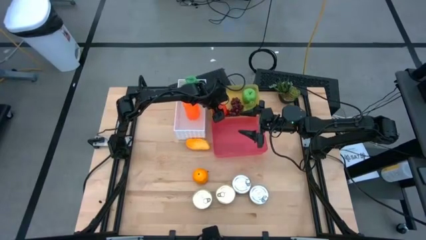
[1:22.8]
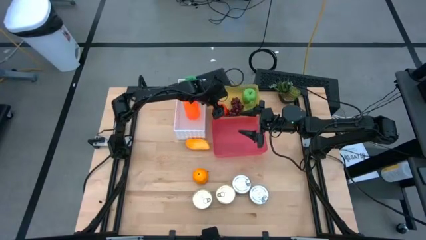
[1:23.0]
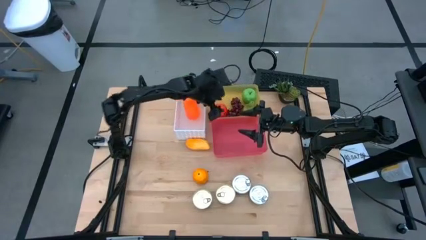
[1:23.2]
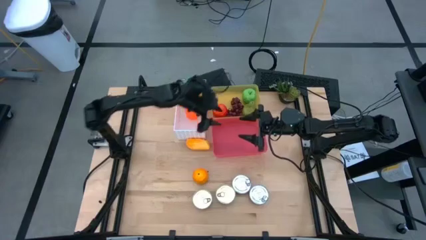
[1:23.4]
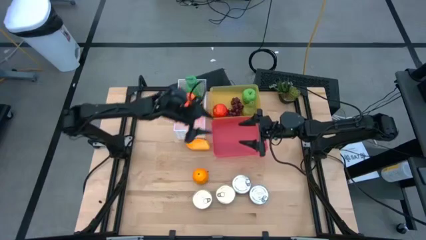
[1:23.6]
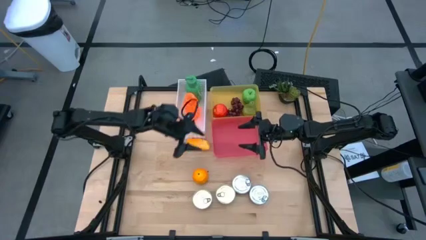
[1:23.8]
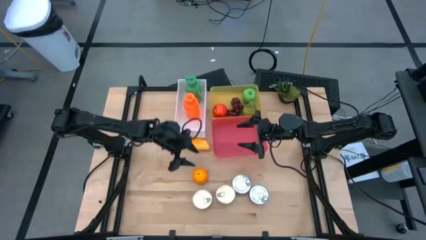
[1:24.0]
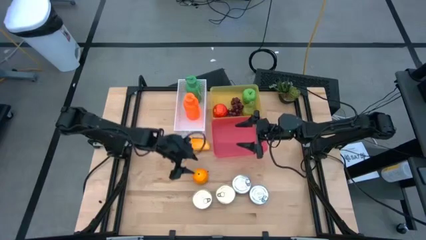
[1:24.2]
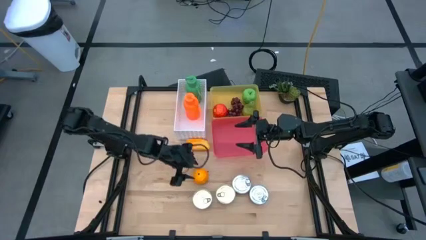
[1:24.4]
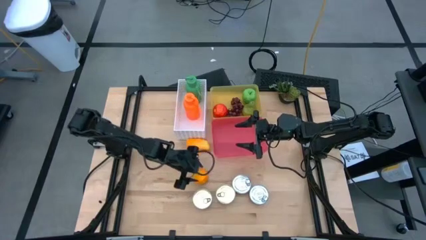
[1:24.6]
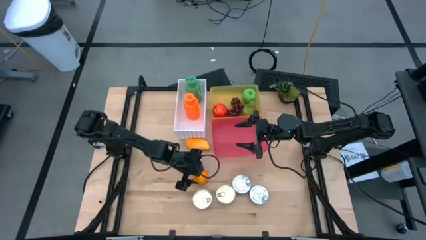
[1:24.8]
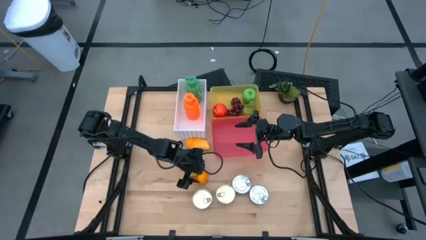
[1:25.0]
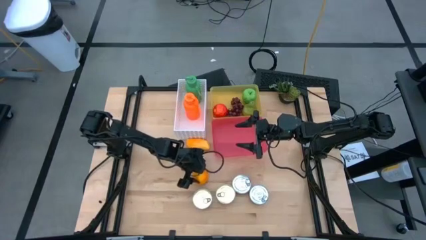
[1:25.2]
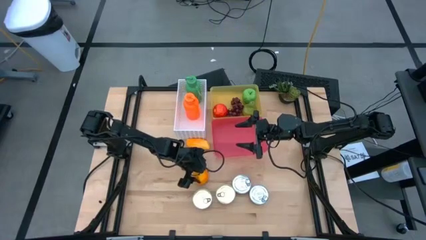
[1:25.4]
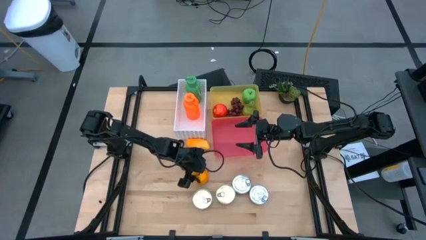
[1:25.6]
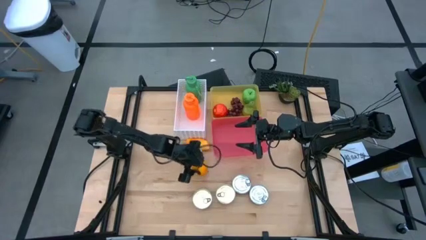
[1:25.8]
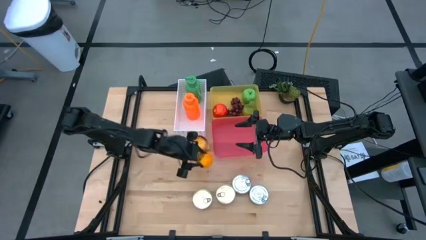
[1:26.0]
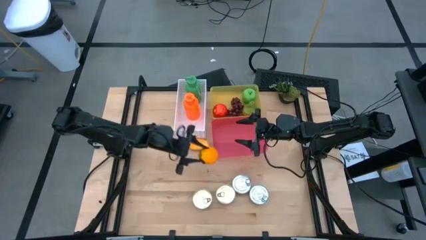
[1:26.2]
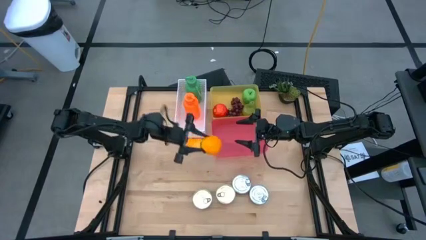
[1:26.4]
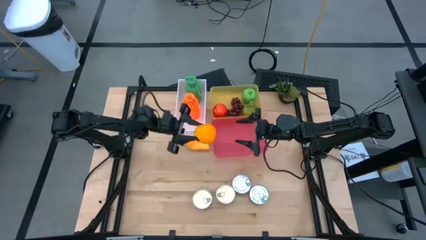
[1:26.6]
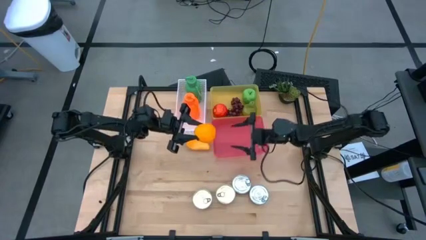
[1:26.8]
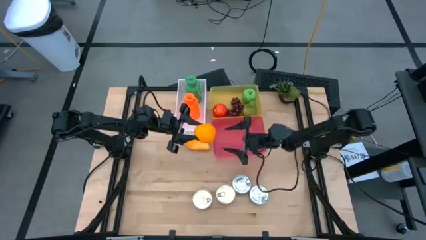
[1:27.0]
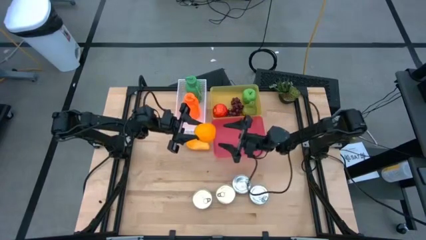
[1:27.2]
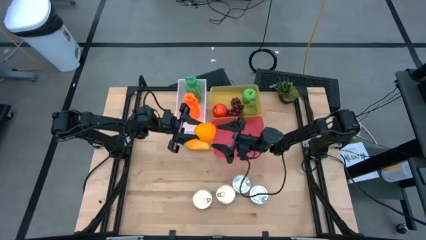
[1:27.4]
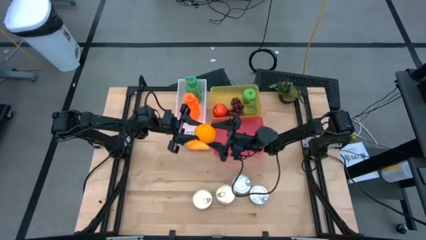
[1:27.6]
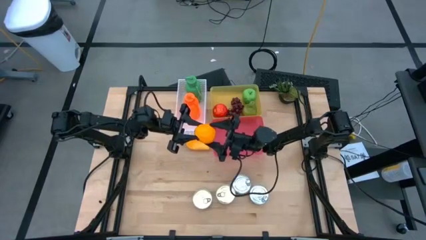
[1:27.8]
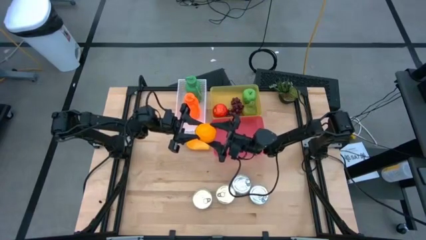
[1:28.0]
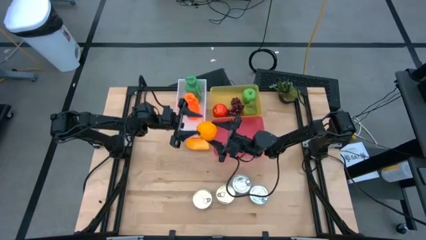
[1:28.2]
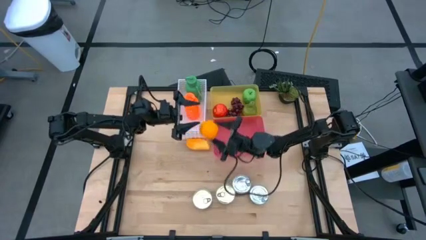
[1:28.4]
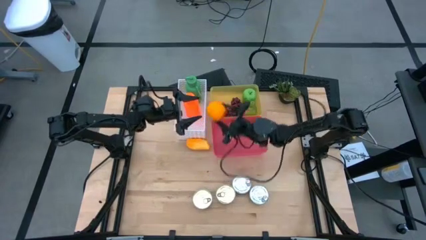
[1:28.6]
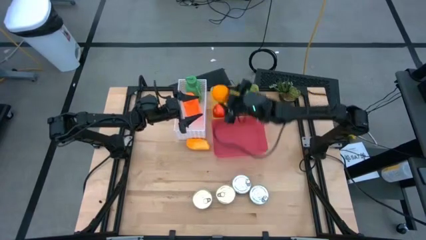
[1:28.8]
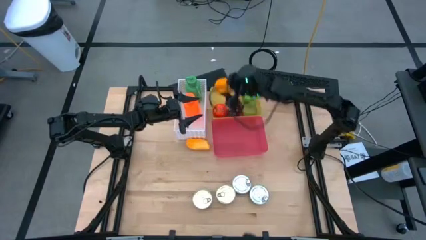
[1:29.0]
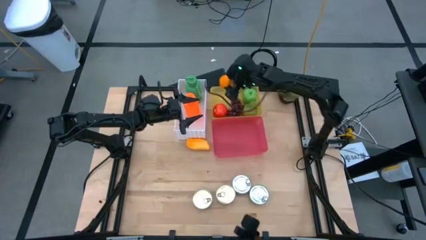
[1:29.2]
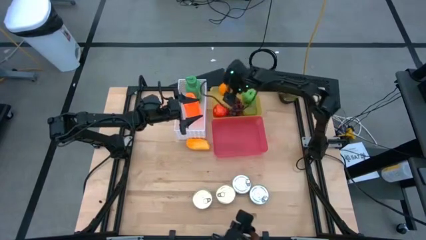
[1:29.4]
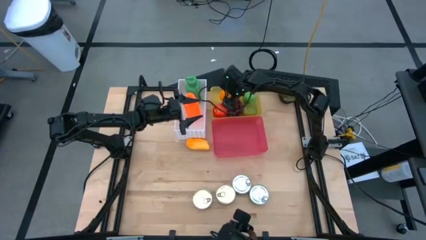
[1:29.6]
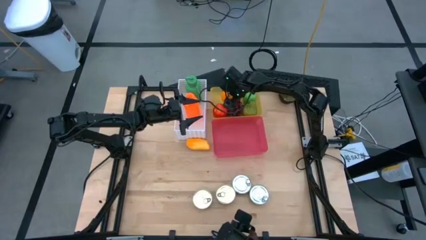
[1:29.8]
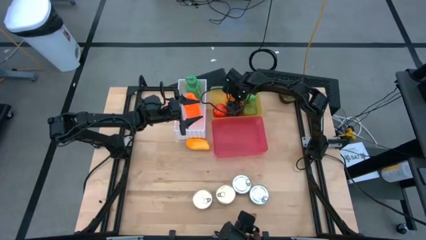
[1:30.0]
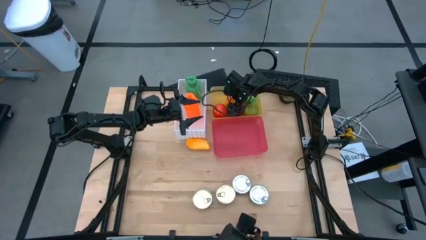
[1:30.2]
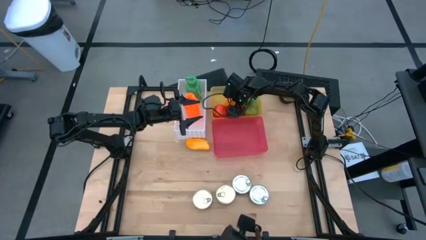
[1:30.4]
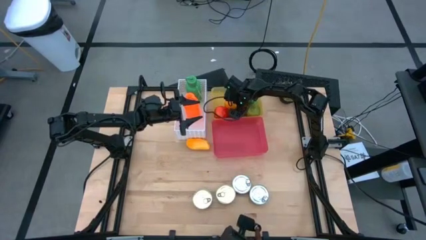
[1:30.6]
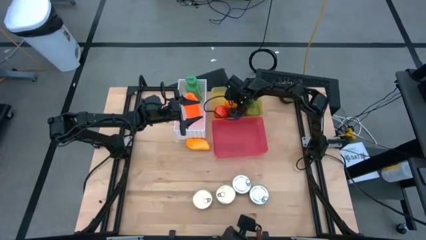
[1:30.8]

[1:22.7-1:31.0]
Task: Pick & Place Food Item
Put the orange into the yellow bin

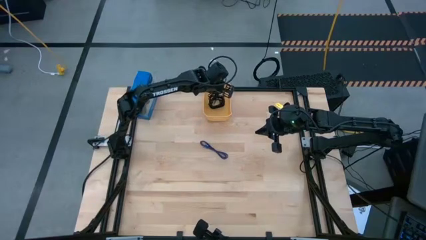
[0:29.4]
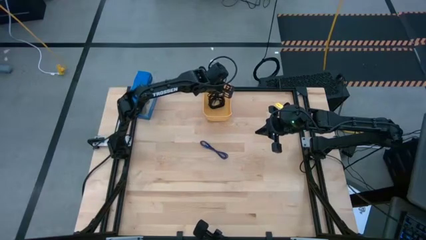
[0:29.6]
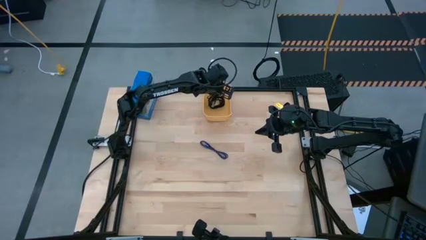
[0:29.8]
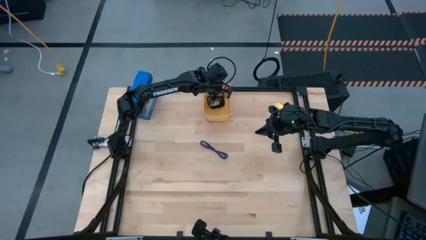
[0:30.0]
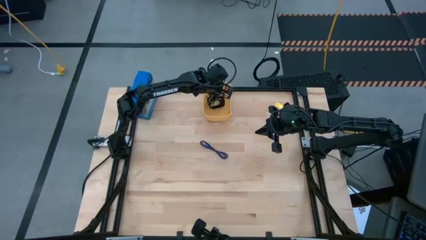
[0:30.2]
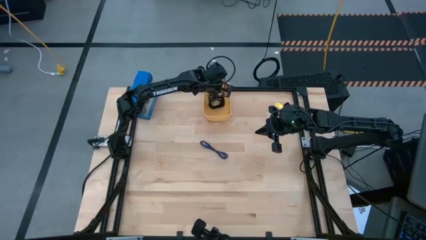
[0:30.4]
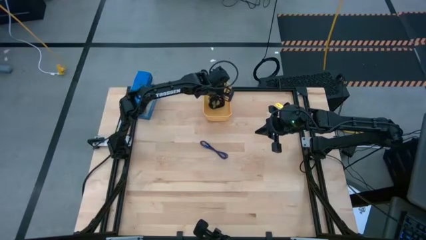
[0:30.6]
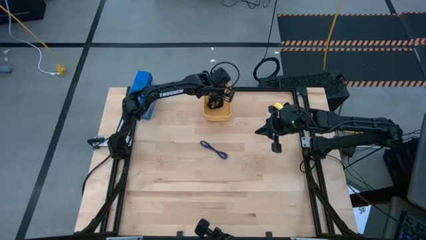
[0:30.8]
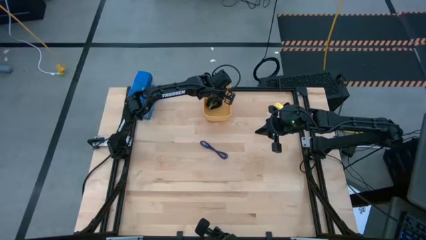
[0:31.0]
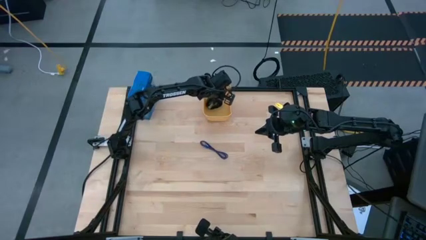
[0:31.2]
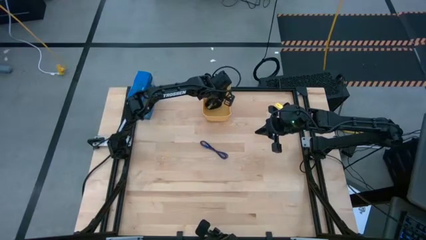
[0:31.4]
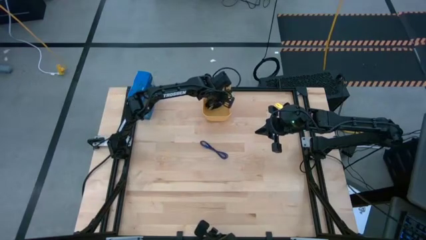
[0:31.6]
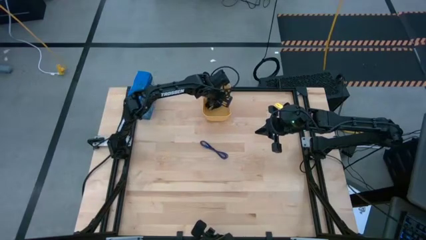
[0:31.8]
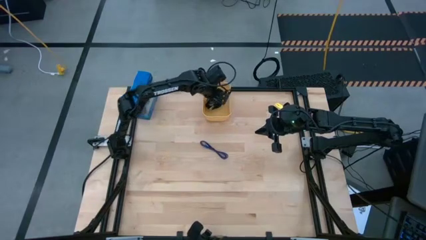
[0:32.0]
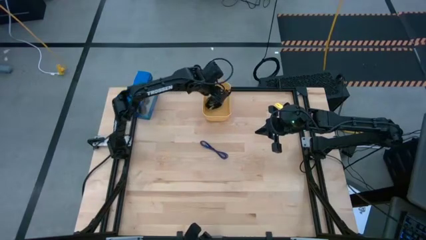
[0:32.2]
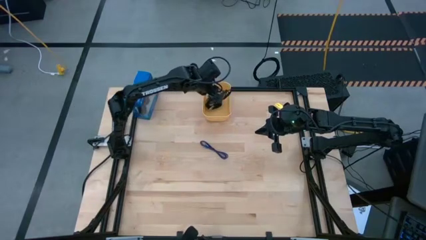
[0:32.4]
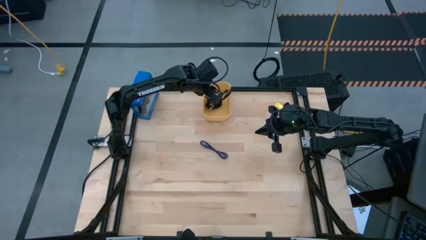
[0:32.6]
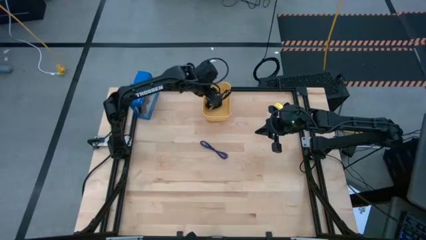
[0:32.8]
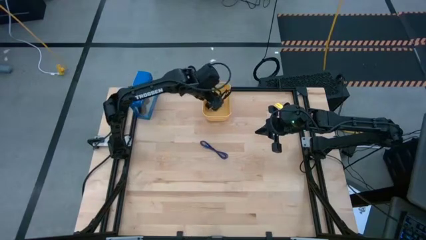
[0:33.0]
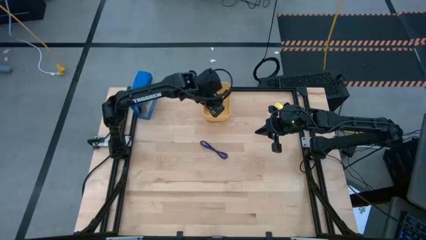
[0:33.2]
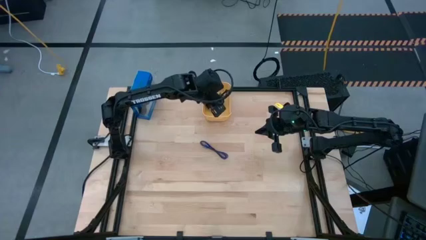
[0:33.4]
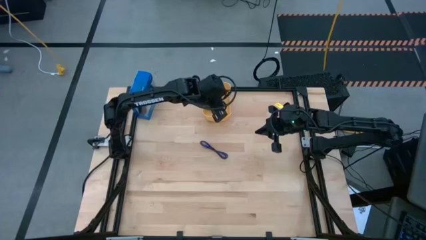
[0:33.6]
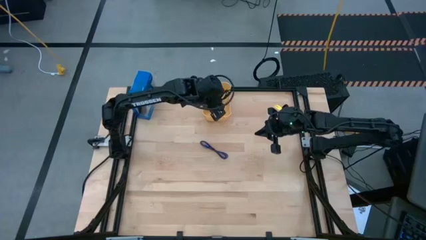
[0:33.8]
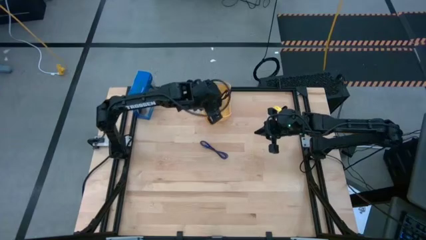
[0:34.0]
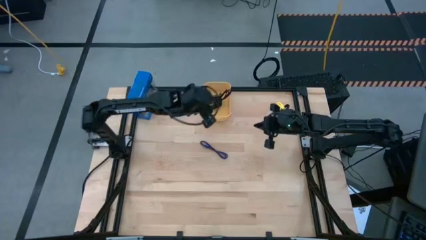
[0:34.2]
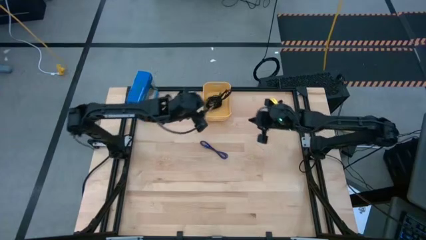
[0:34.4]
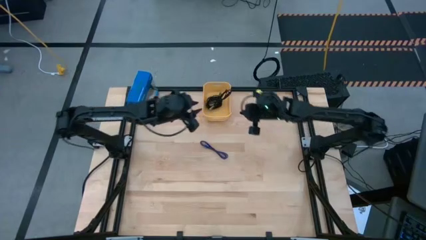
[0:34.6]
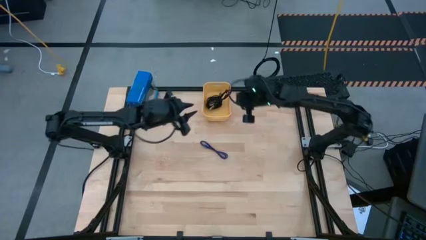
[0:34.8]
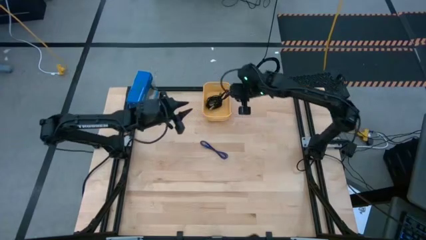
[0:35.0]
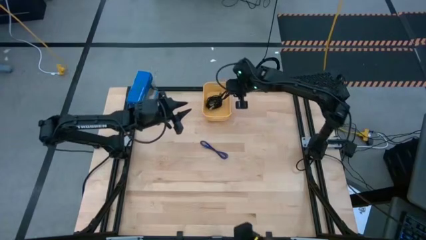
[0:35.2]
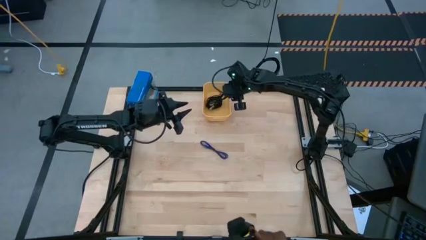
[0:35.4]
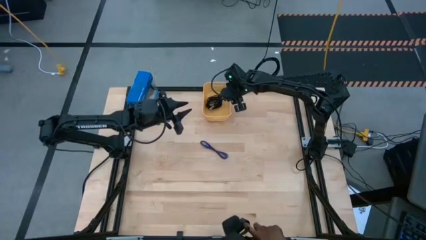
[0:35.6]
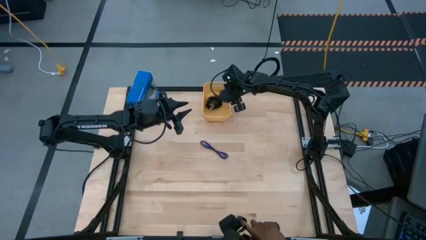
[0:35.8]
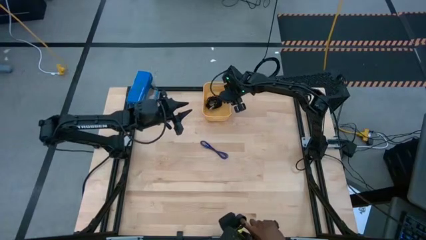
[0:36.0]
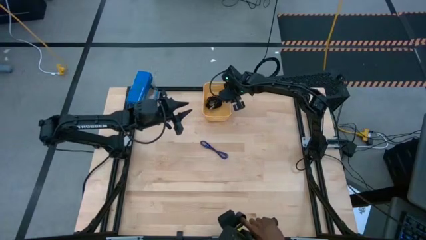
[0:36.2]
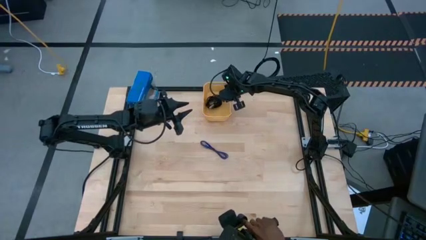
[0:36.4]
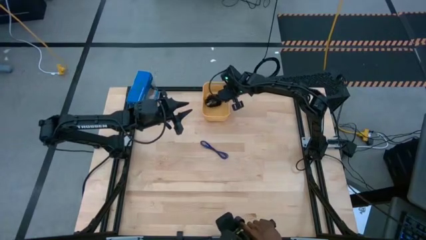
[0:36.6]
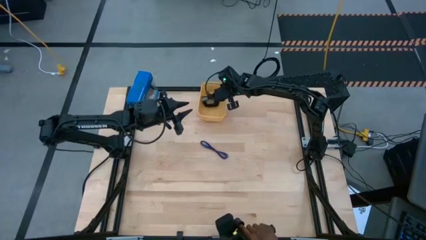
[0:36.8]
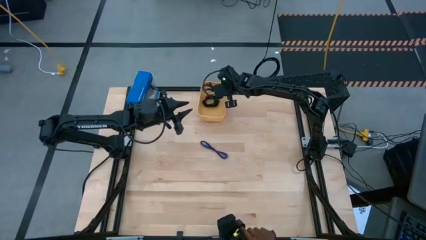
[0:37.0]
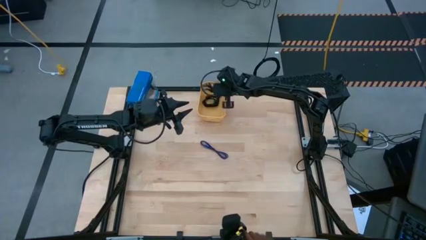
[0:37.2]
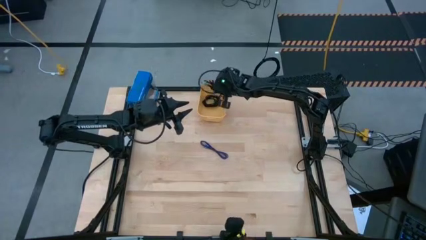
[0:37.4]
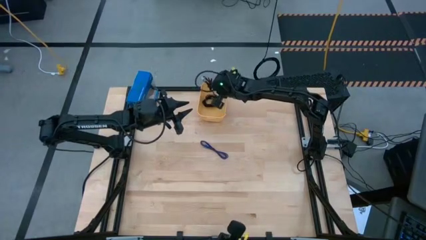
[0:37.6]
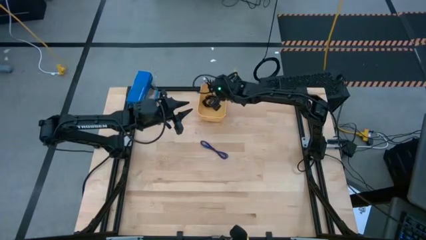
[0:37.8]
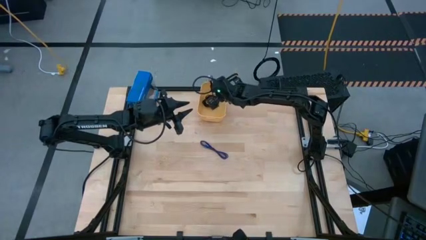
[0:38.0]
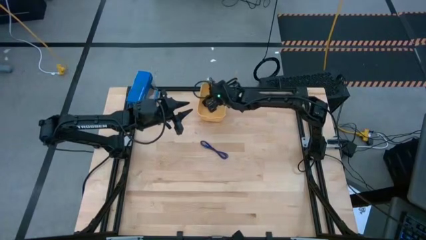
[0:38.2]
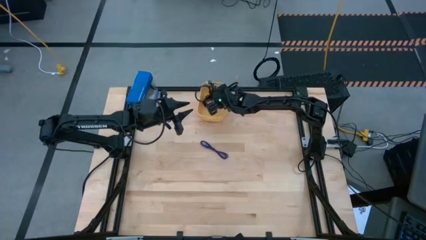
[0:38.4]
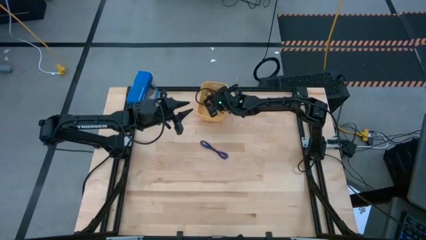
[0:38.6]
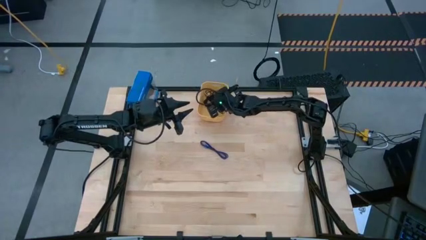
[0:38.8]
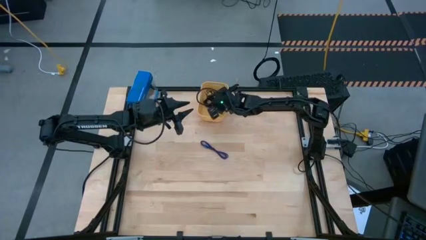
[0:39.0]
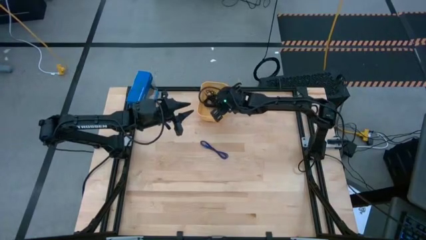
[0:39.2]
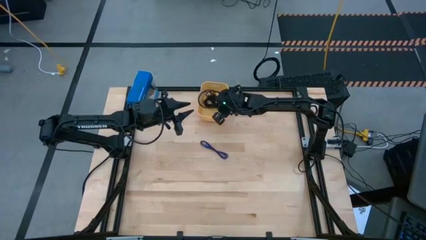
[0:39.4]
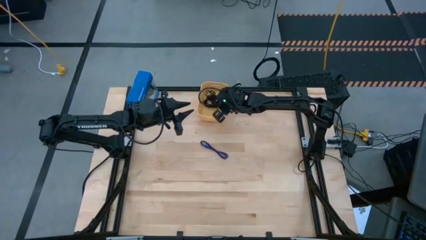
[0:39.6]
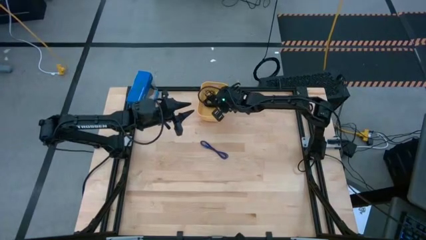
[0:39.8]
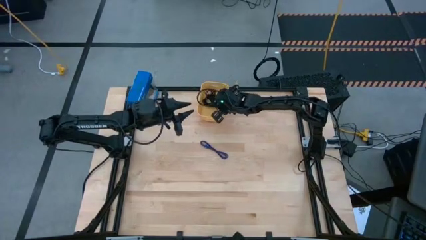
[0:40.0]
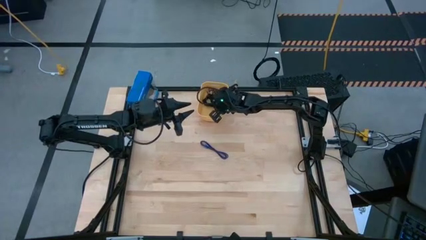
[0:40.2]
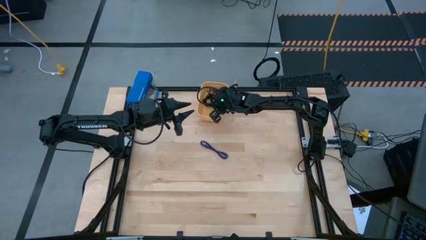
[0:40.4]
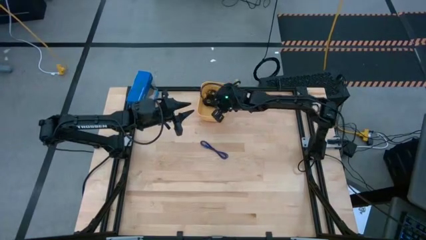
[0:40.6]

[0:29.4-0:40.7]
Task: Pick and place USB-C Cables
Put the black charger cable into the yellow bin
